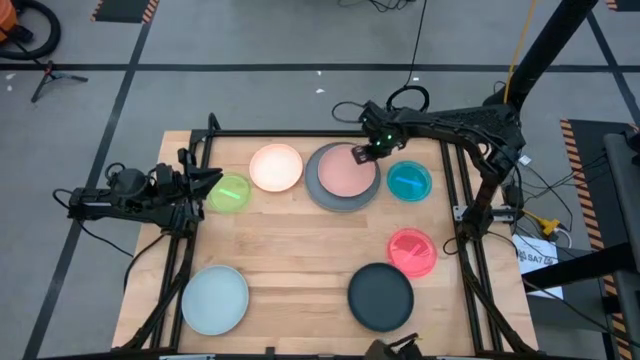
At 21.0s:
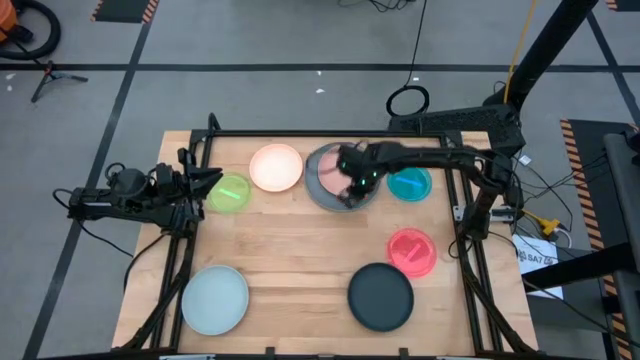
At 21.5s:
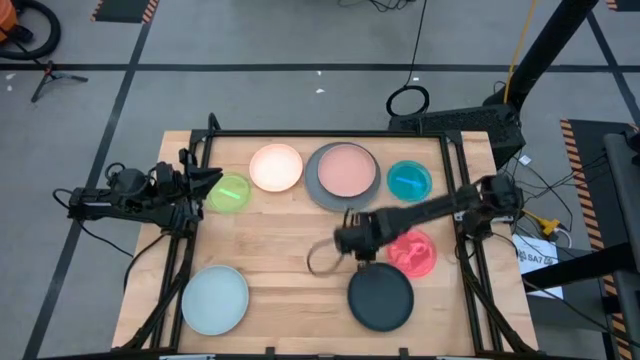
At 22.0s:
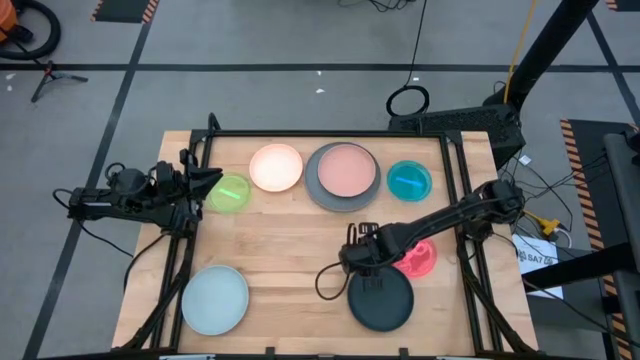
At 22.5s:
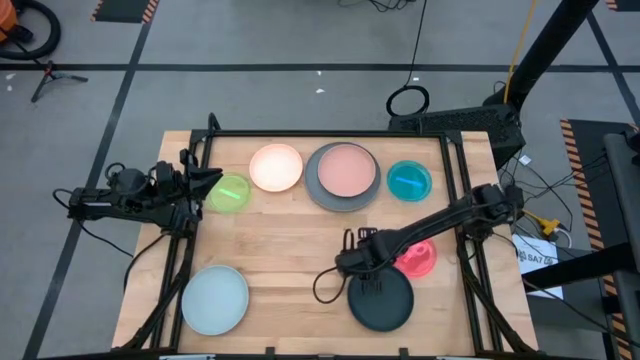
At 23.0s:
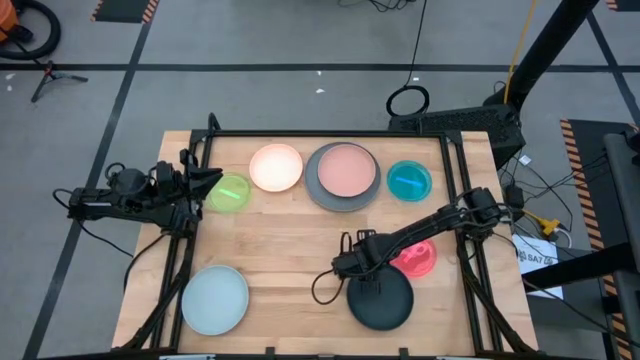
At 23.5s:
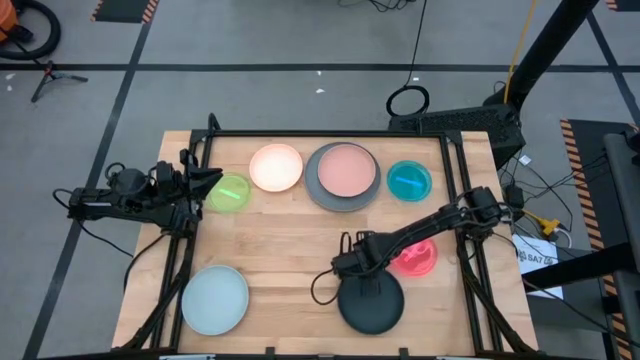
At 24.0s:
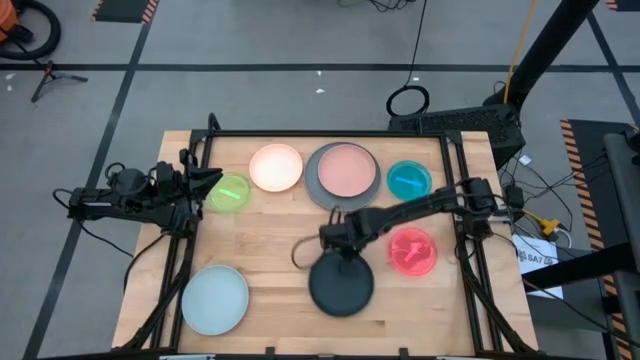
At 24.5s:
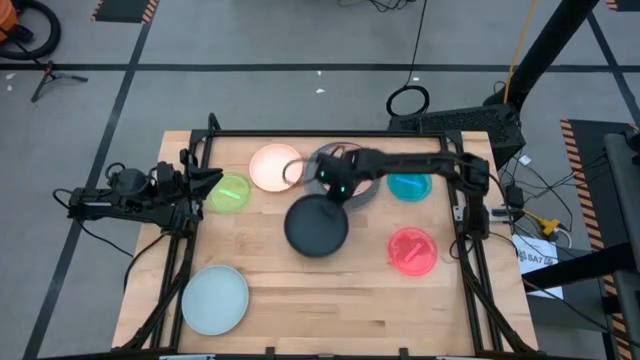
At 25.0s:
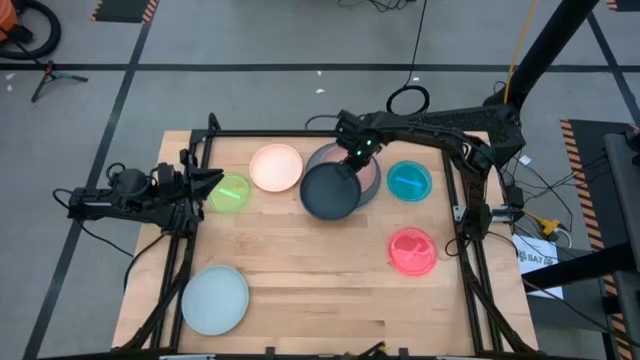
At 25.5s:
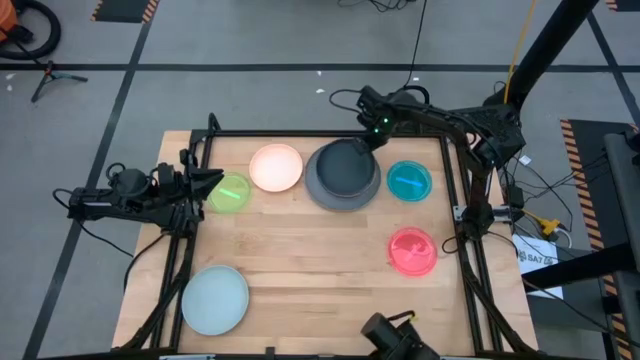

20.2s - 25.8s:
Task: Stack plastic plates
Stack the black plate on top of the pink plate

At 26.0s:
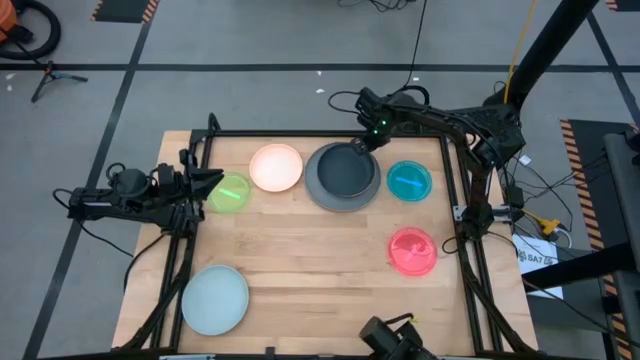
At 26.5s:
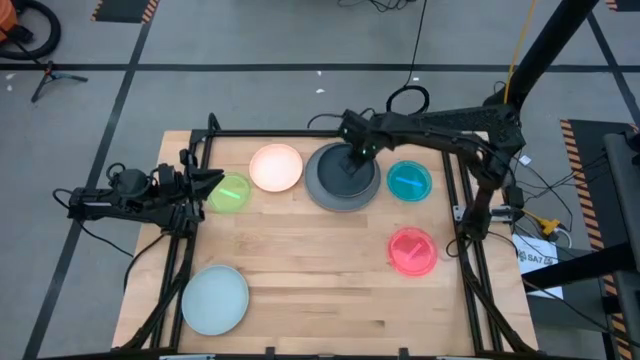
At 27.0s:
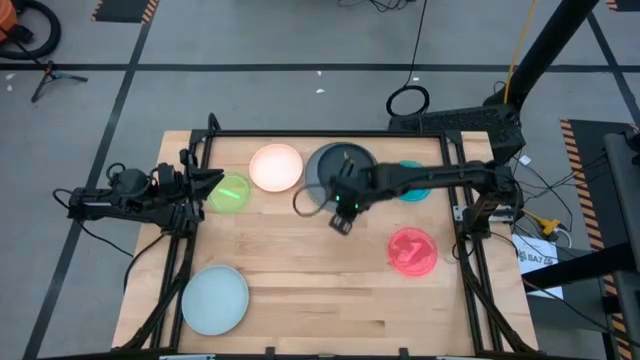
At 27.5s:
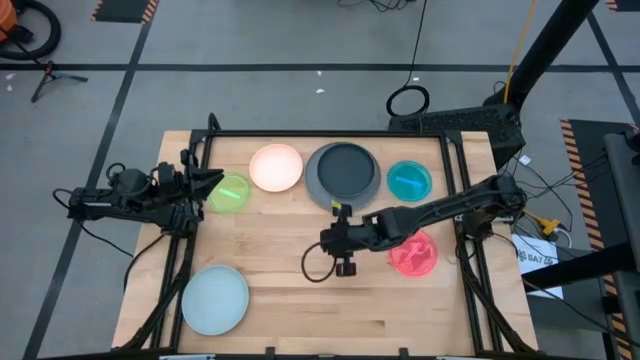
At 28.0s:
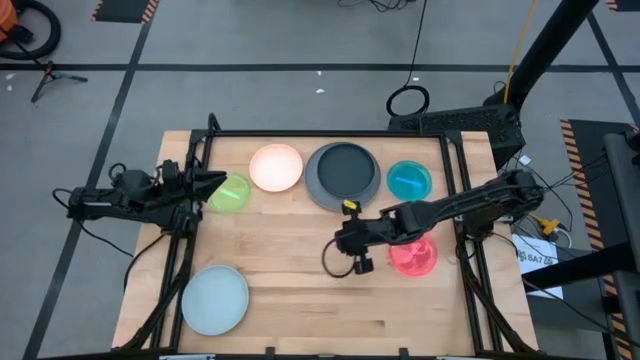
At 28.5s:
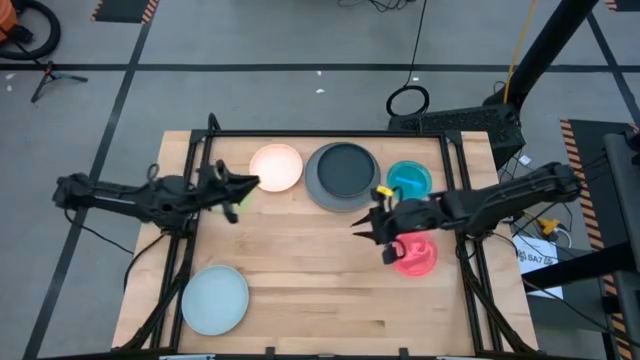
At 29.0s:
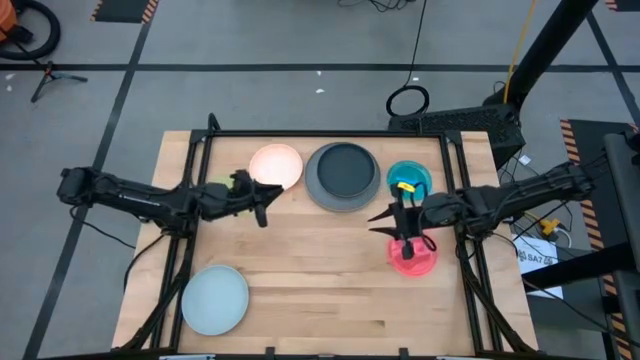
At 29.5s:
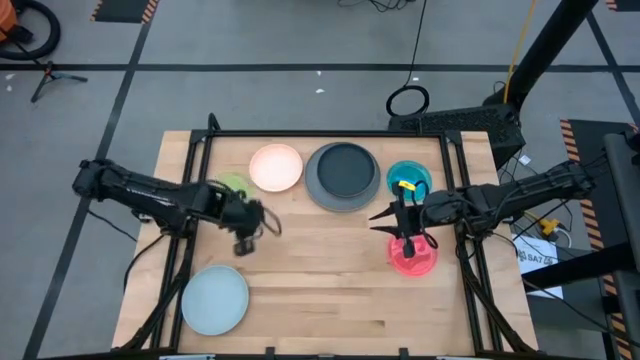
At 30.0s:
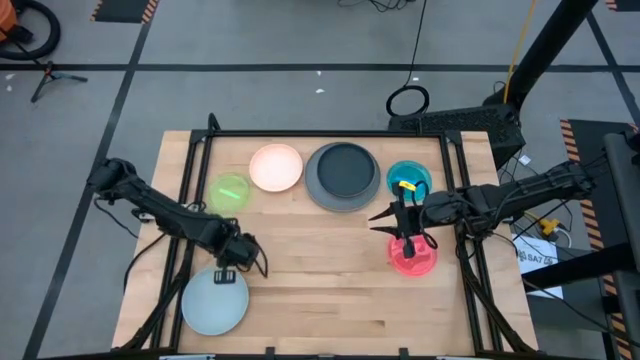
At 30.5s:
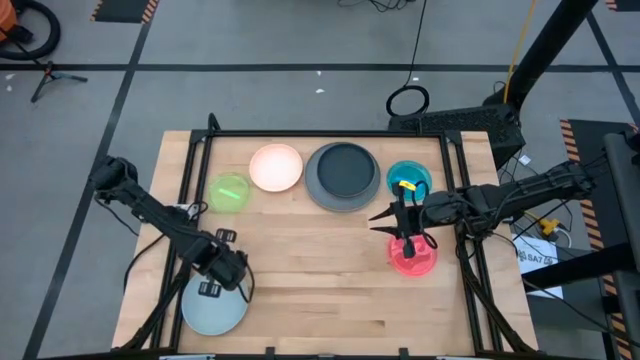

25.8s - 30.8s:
Stack the light blue plate on top of the black plate

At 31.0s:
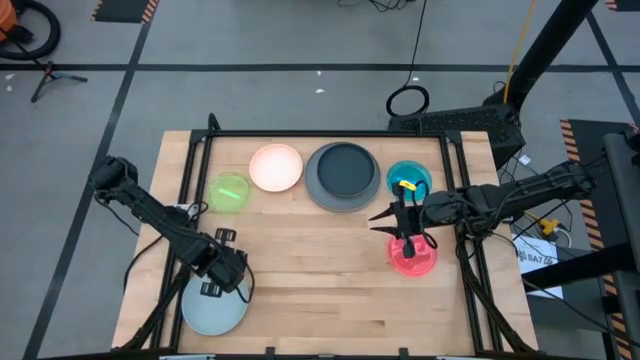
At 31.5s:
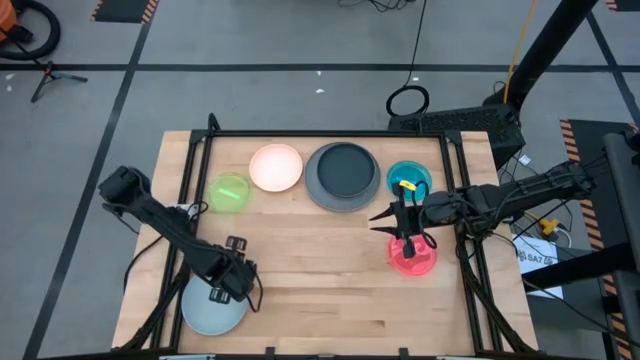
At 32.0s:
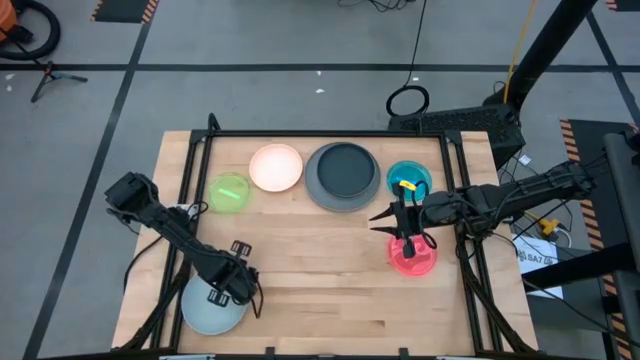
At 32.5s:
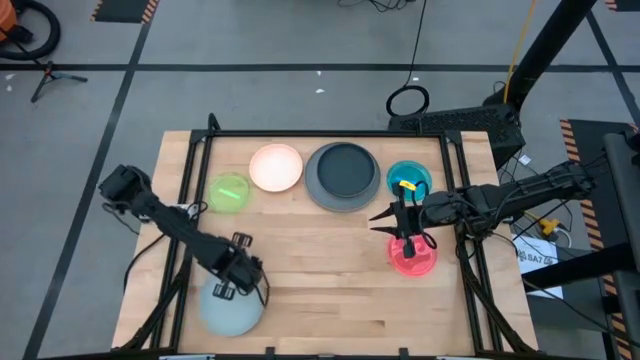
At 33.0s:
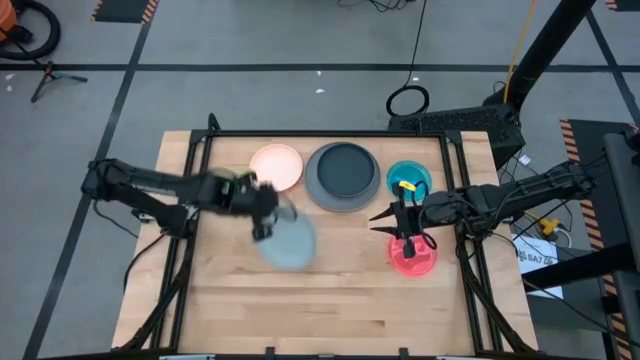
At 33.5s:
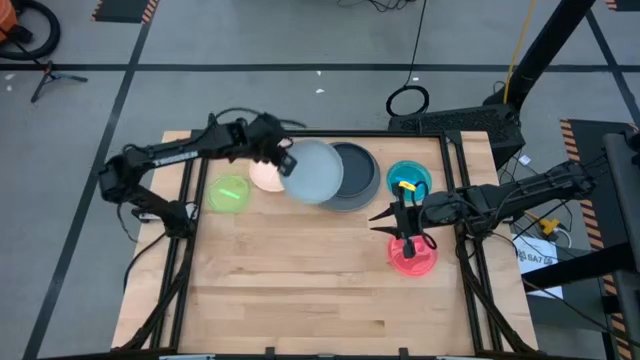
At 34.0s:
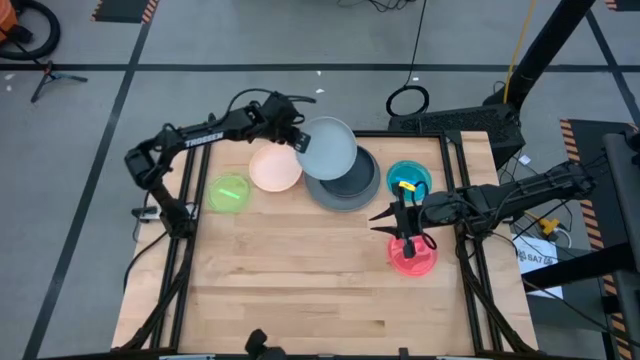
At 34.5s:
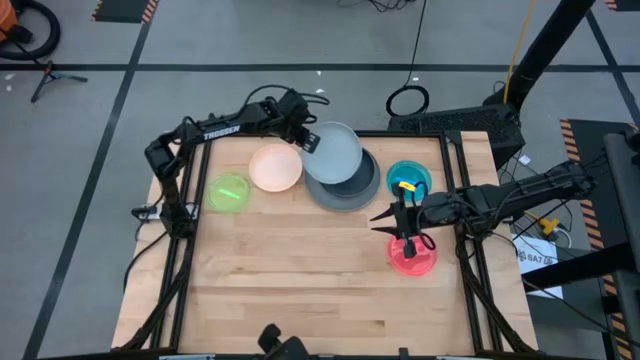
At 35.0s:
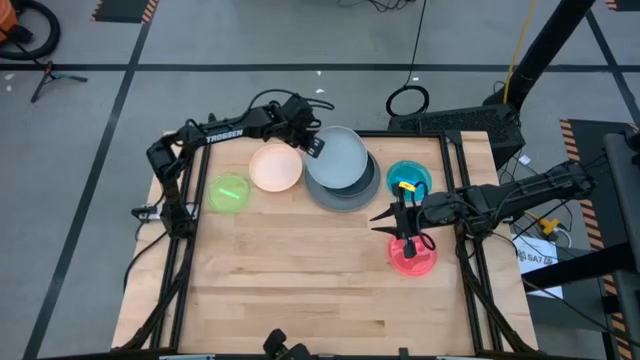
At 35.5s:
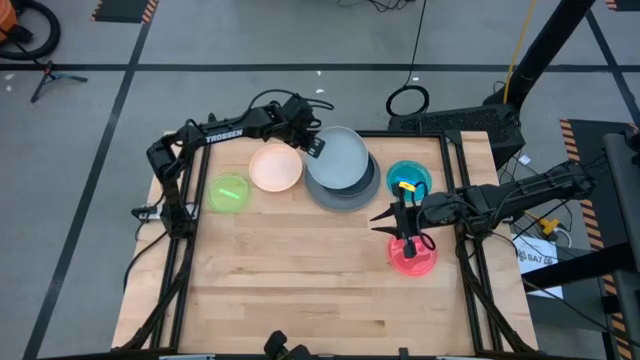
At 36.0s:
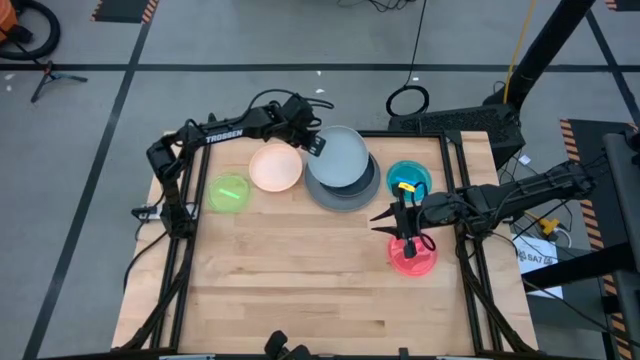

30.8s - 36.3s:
Stack the light blue plate on top of the black plate

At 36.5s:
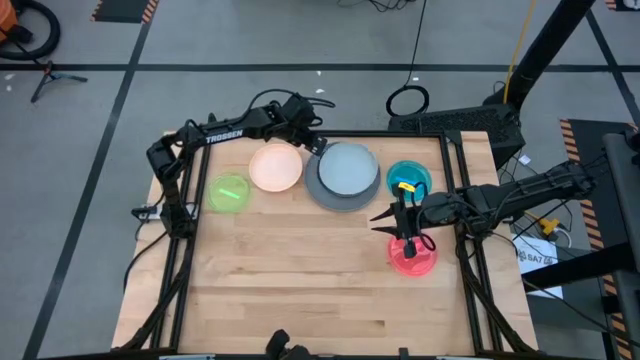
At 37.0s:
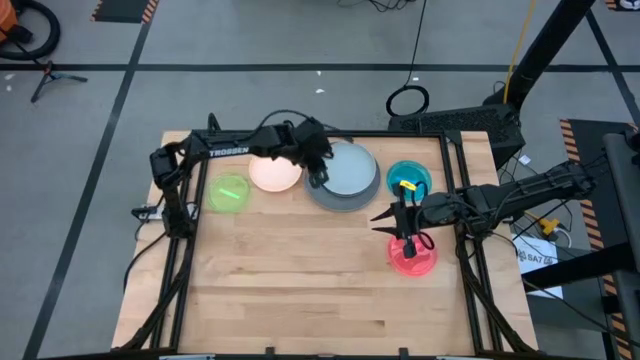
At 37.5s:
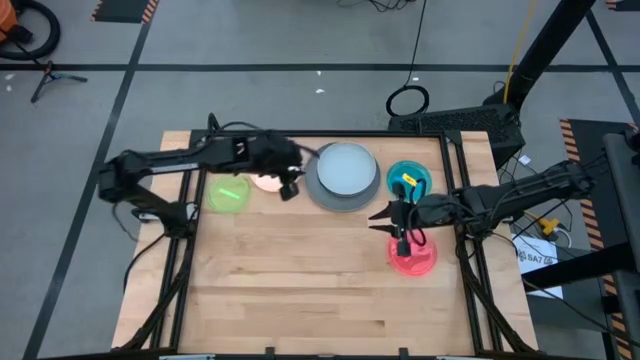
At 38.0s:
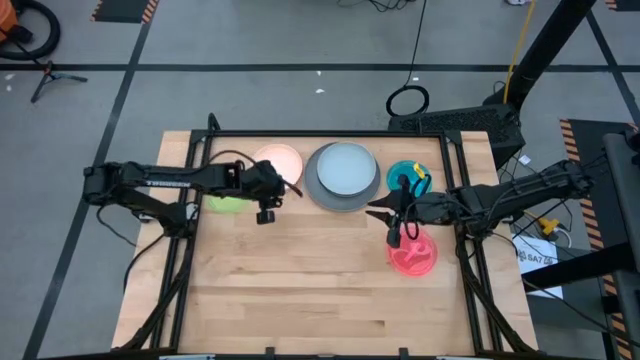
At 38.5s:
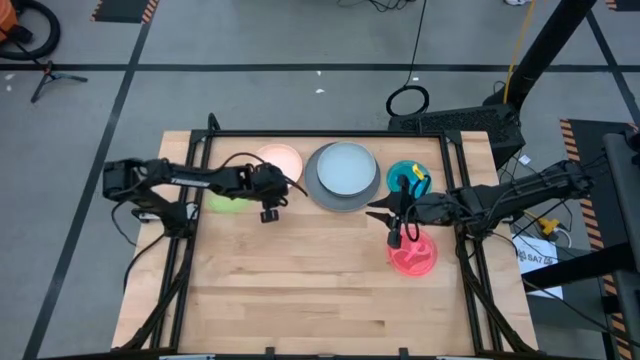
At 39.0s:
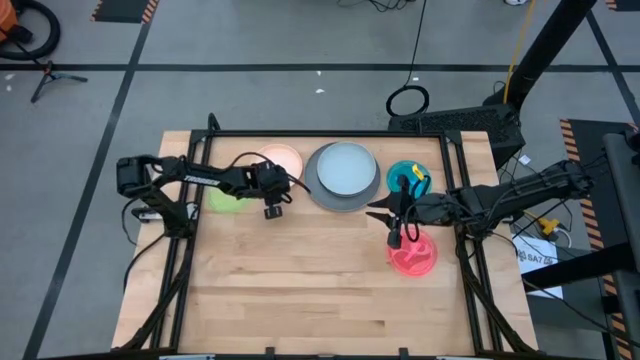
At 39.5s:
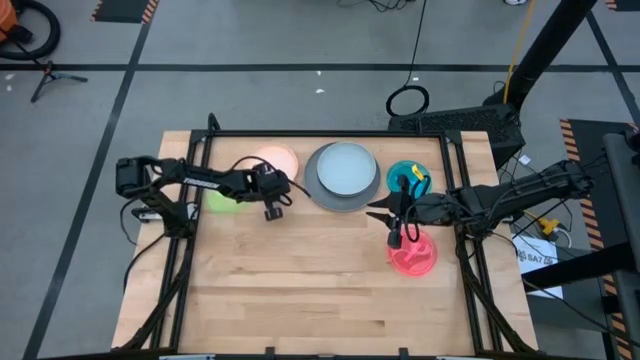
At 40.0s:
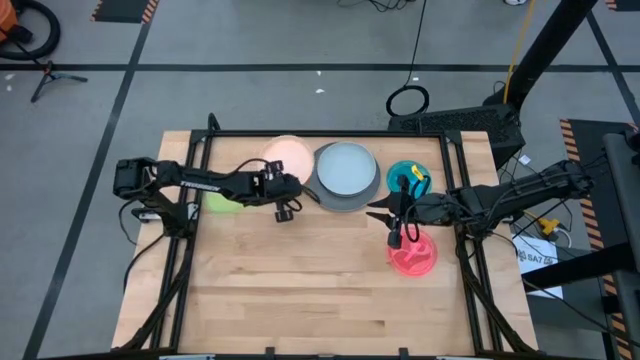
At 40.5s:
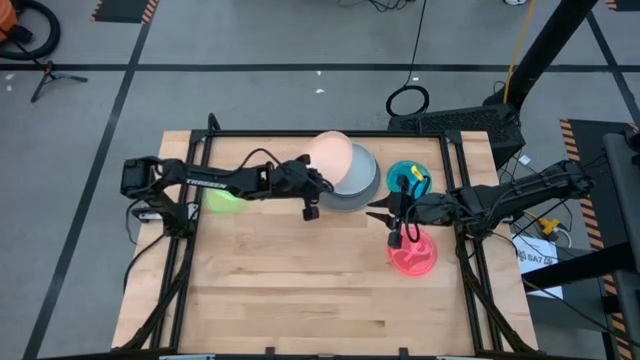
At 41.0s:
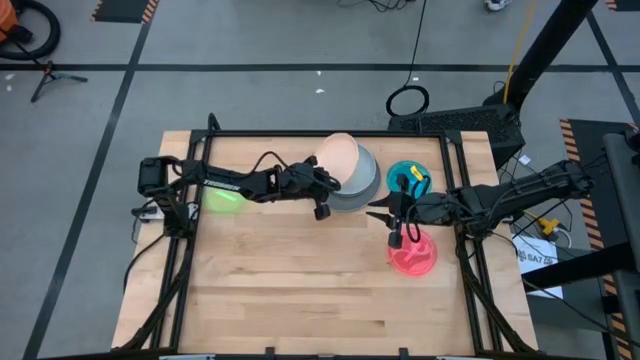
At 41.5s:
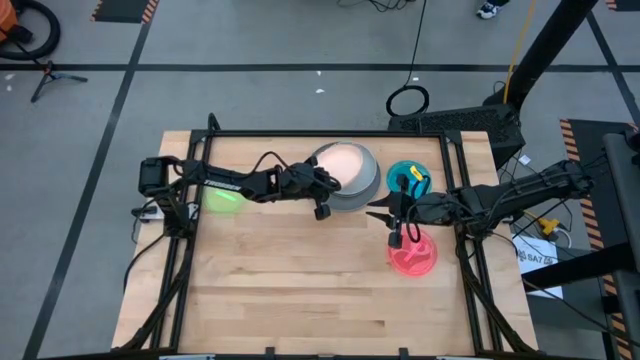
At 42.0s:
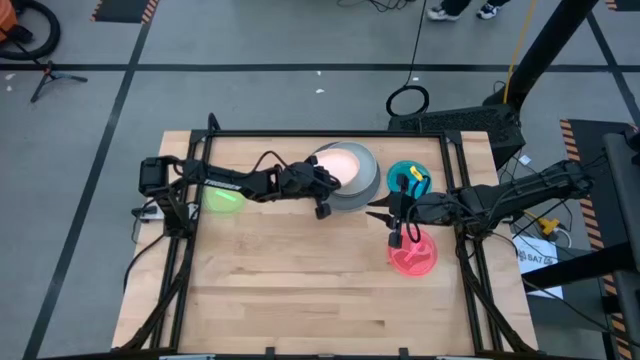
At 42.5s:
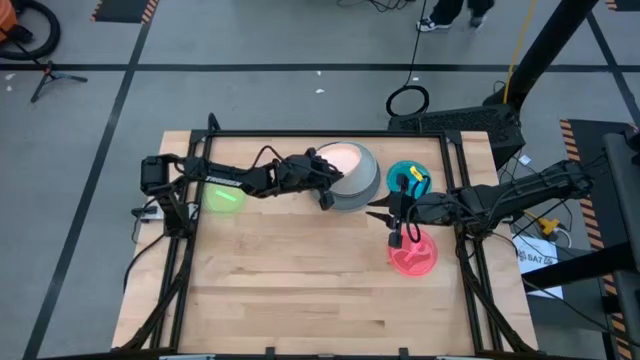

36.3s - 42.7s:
Stack the light orange plate on top of the light blue plate
